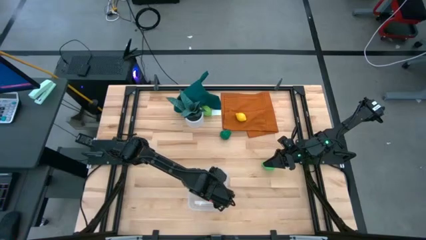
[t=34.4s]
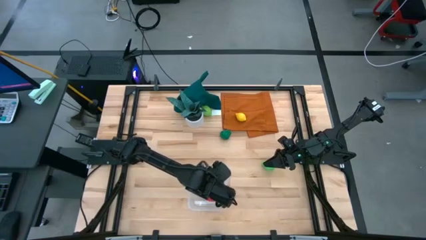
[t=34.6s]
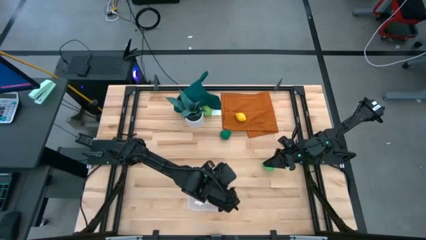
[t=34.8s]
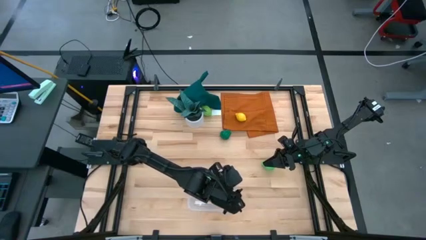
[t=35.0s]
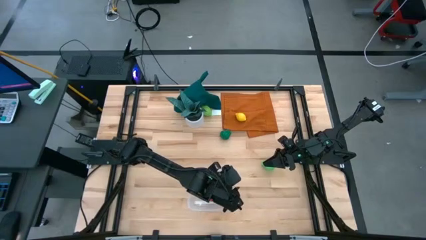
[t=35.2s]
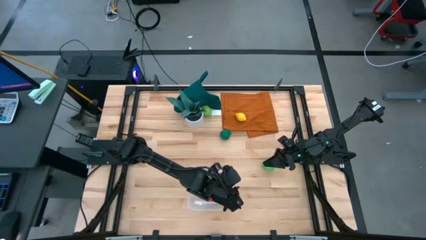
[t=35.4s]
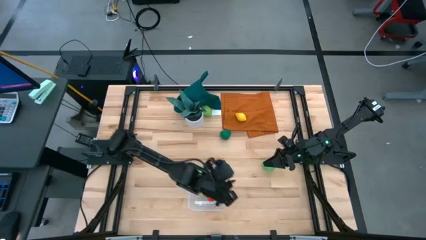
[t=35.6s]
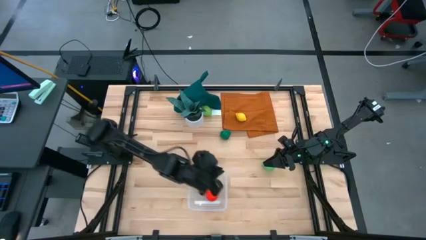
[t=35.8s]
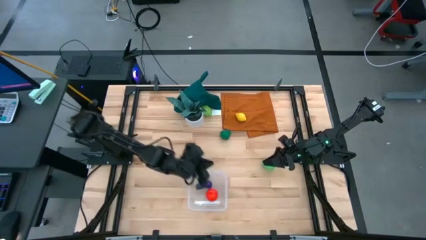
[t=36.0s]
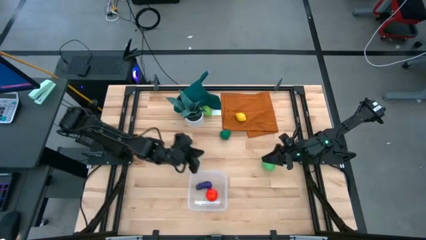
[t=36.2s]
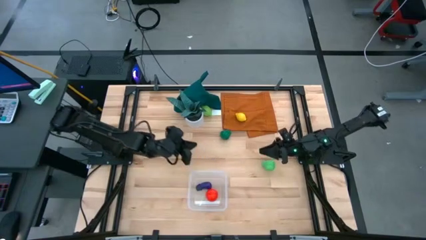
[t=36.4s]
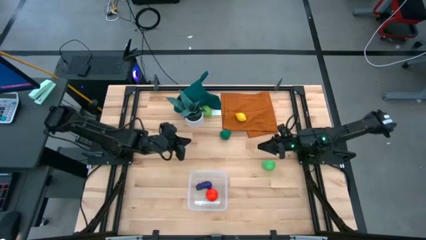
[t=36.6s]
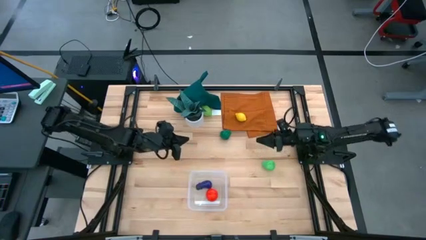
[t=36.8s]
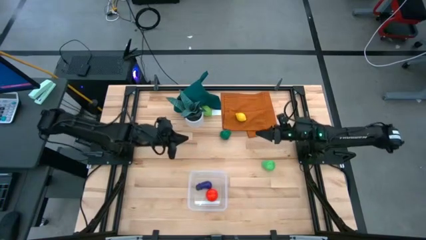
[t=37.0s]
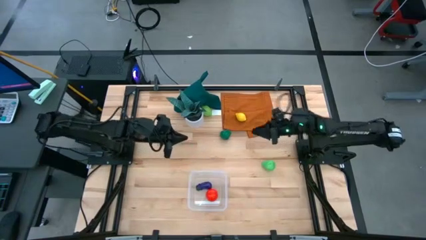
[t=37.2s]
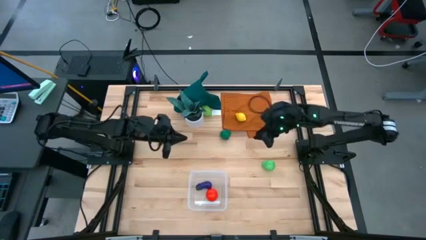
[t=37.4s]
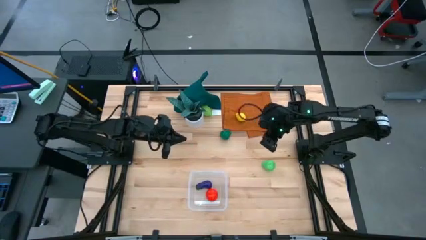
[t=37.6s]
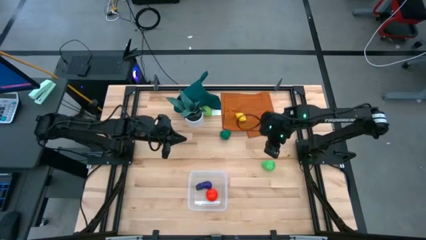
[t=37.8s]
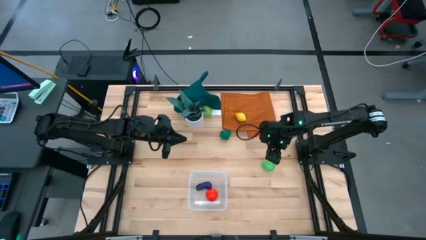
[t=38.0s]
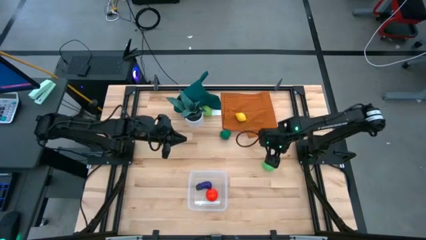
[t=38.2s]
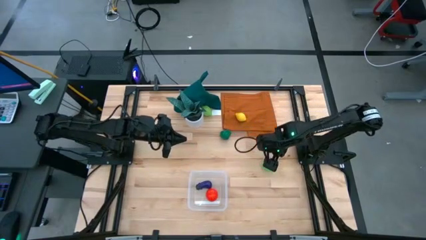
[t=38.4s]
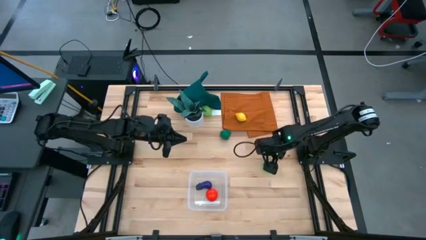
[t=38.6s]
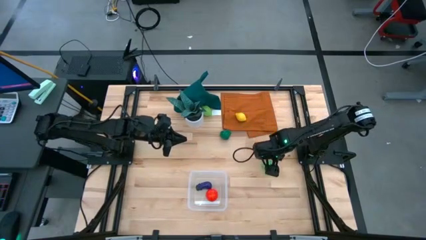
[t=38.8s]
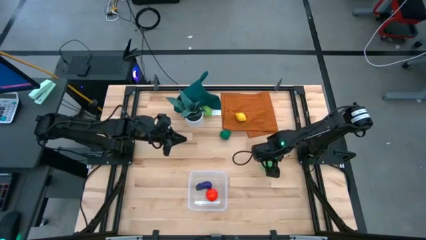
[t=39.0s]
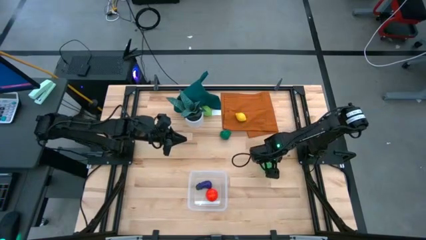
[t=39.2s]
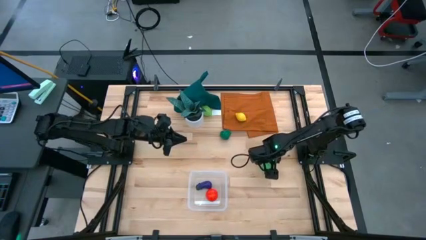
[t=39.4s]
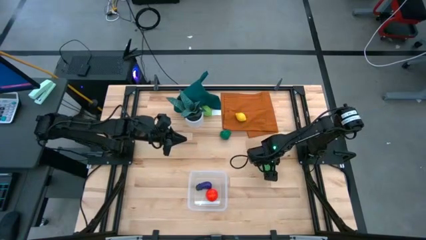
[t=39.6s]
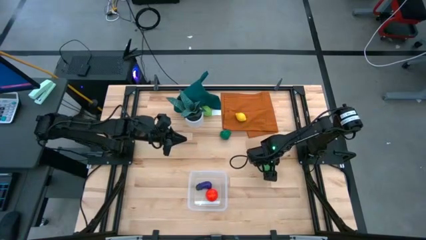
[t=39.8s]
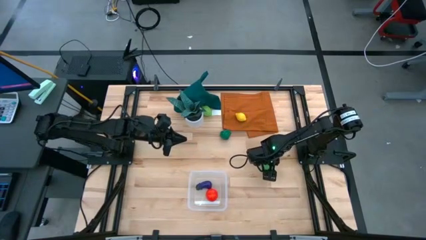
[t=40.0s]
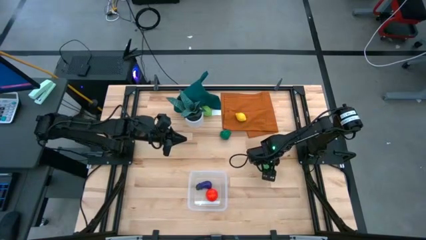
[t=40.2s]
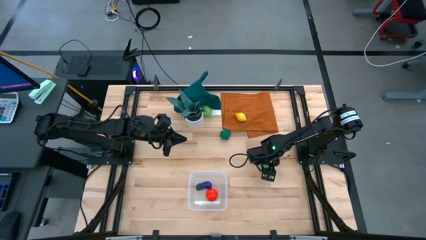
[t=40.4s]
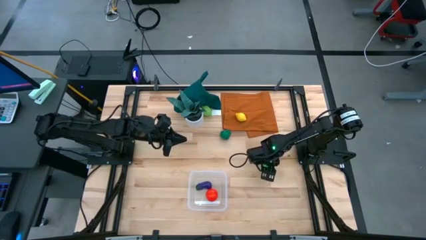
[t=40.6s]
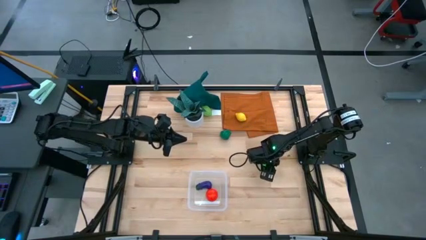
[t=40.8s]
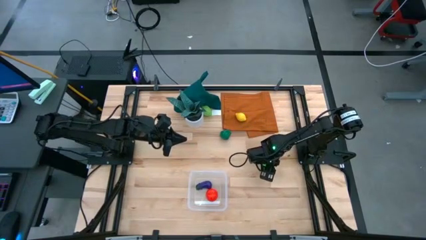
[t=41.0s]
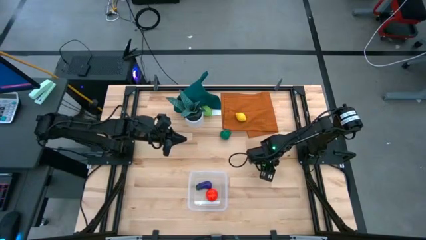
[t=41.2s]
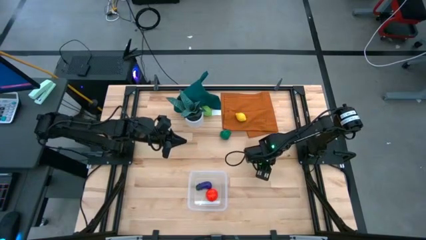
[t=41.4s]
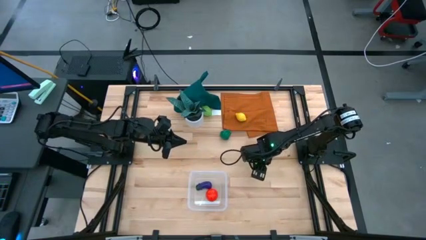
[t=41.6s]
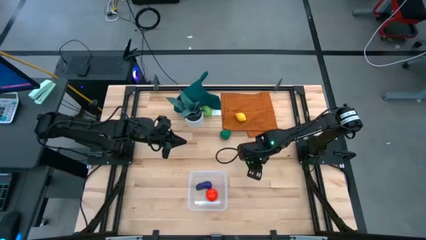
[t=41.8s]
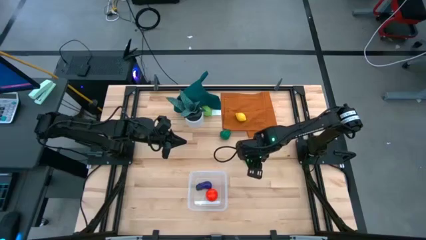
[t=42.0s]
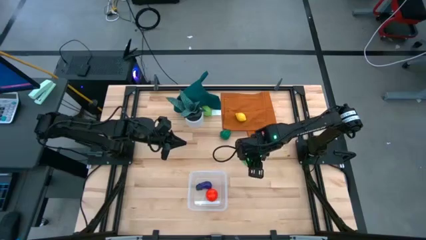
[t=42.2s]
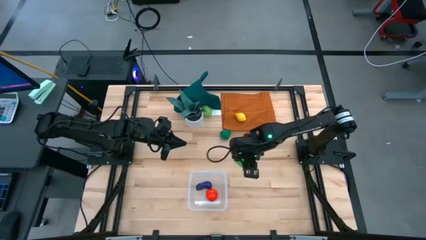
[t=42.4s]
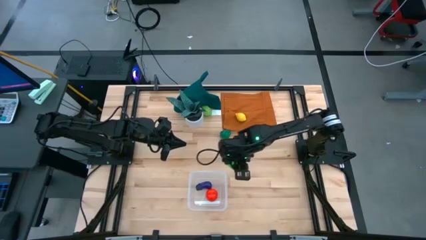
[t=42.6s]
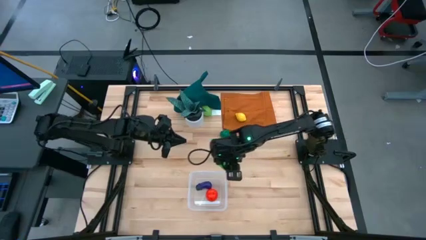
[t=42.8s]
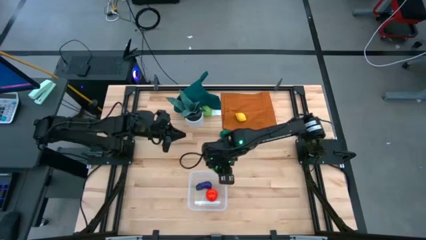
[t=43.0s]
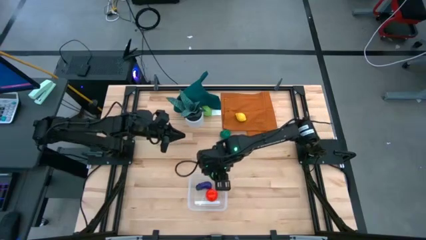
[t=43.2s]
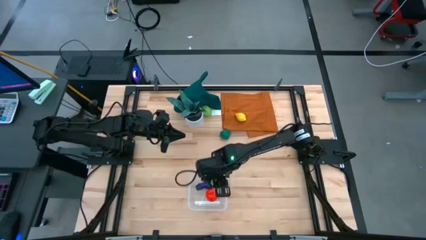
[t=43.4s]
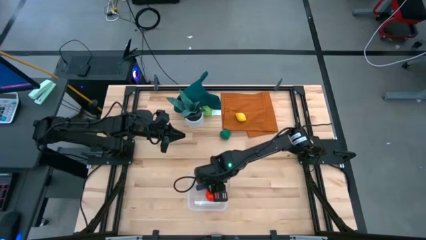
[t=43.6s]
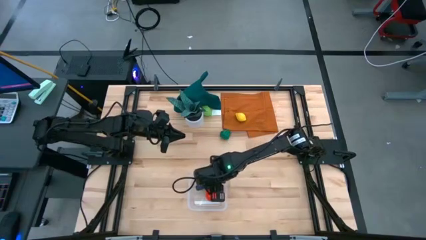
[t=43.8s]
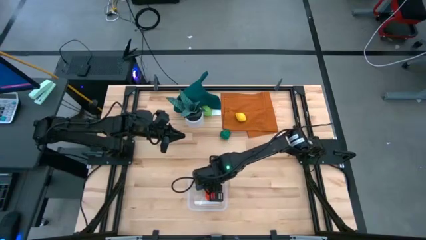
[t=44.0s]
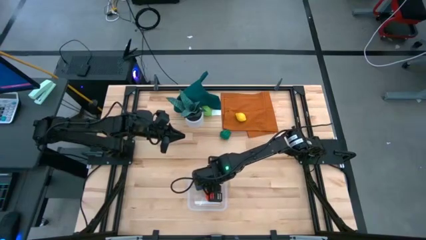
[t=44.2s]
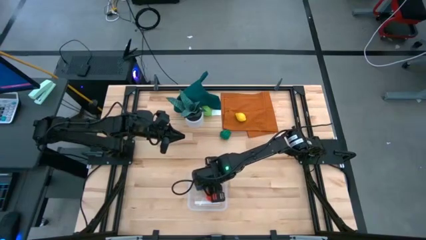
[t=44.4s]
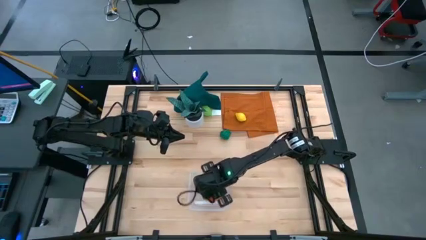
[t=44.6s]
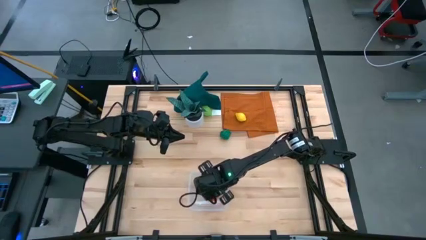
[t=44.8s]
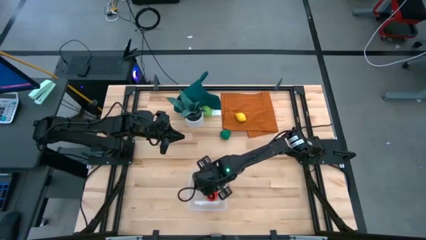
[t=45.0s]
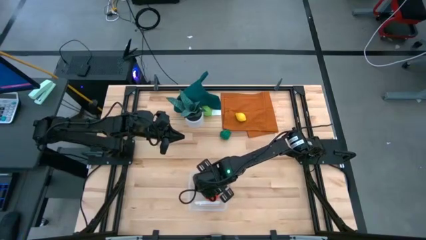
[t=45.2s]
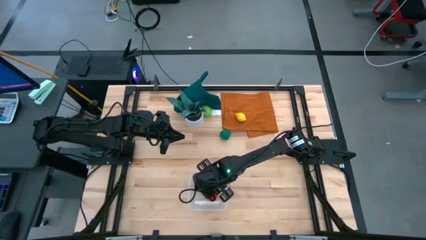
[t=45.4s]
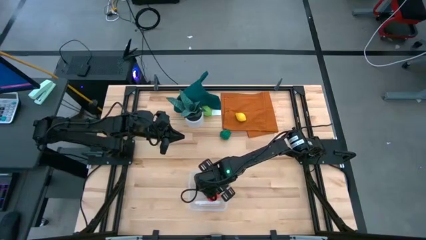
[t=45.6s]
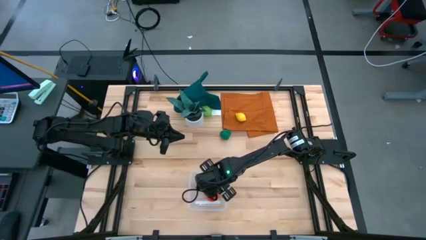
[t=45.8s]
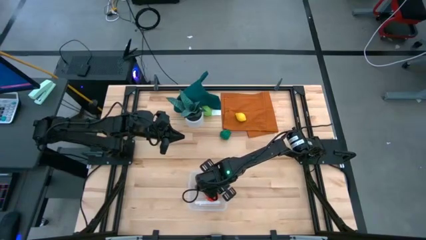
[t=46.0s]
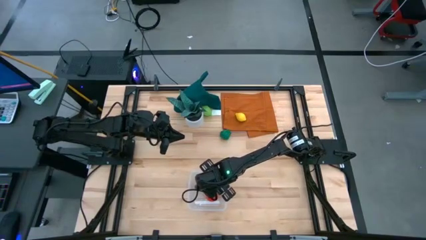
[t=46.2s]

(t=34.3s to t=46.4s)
Task: Pick and placing Produce into tupperware
Put the pear into the transparent bin
